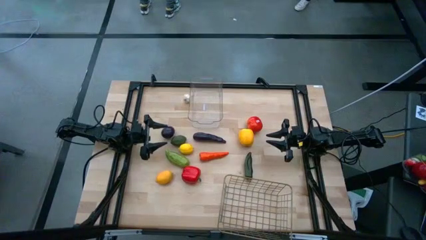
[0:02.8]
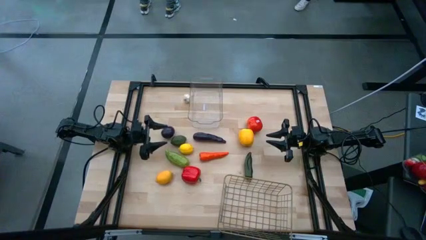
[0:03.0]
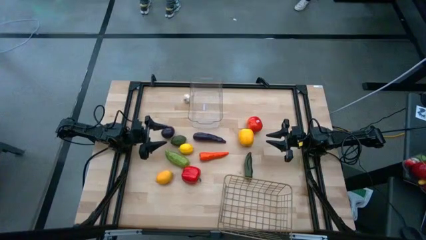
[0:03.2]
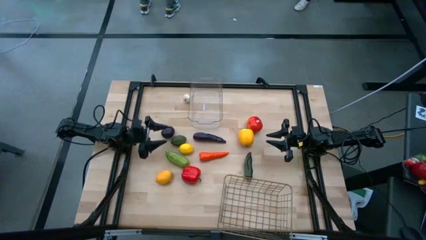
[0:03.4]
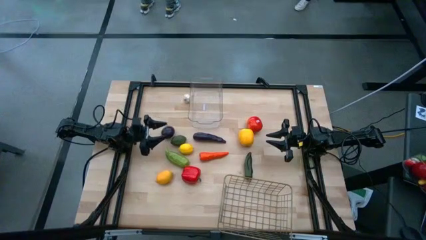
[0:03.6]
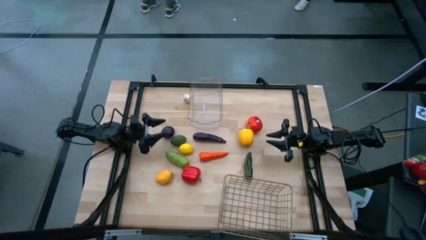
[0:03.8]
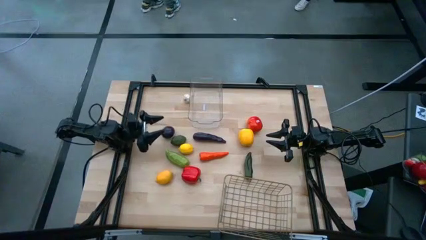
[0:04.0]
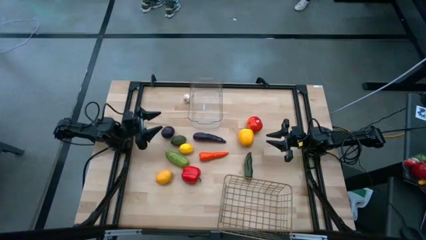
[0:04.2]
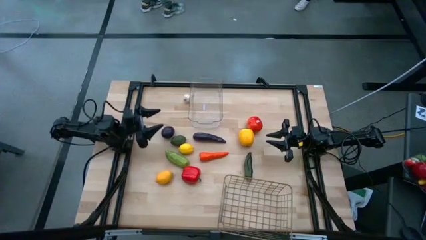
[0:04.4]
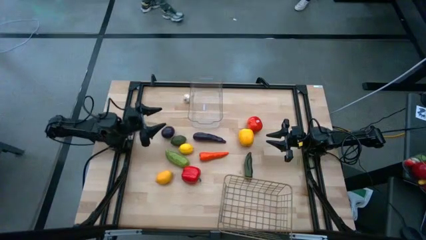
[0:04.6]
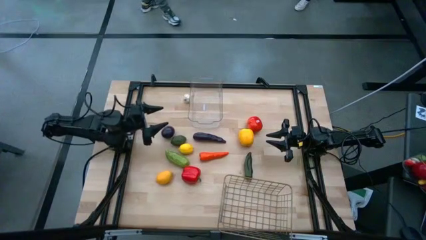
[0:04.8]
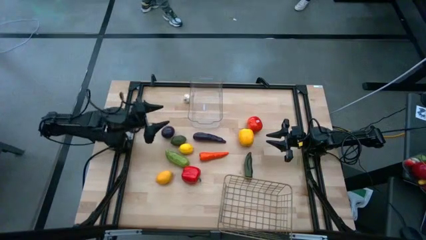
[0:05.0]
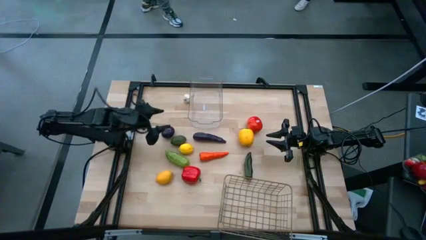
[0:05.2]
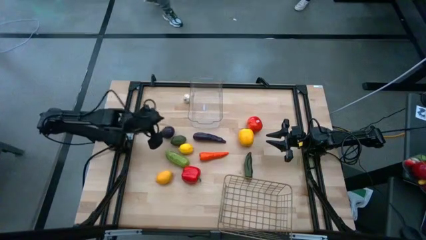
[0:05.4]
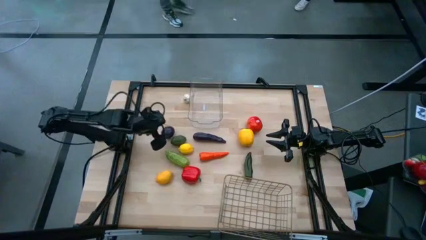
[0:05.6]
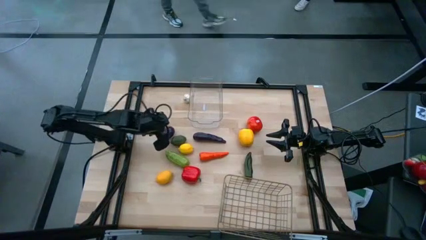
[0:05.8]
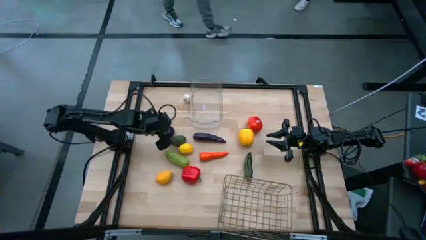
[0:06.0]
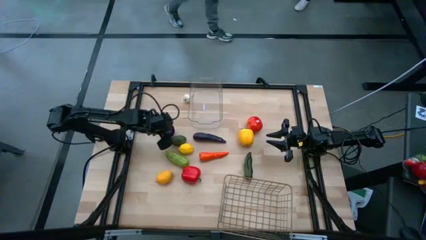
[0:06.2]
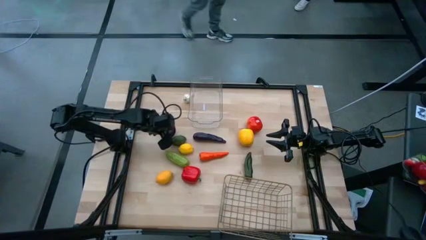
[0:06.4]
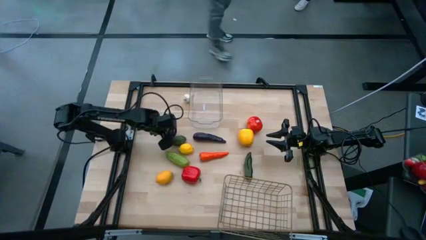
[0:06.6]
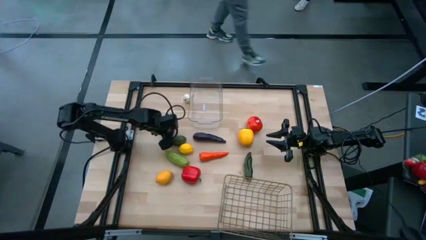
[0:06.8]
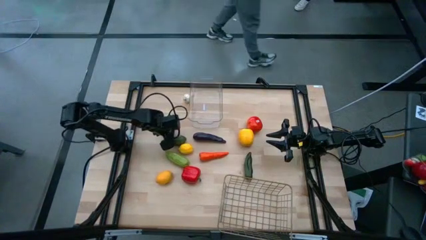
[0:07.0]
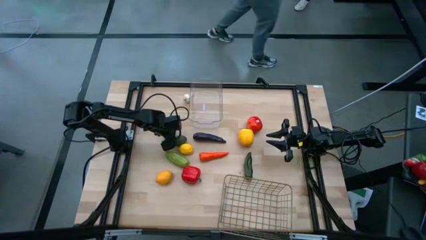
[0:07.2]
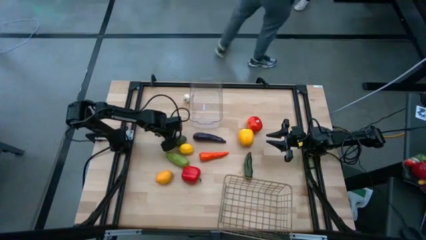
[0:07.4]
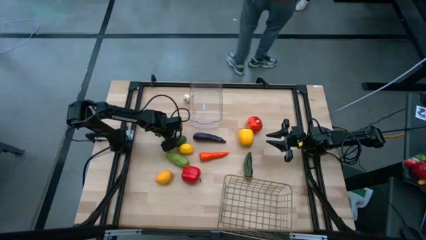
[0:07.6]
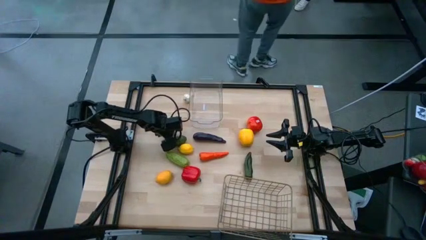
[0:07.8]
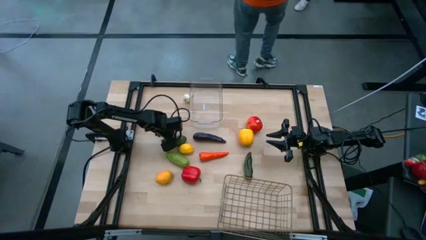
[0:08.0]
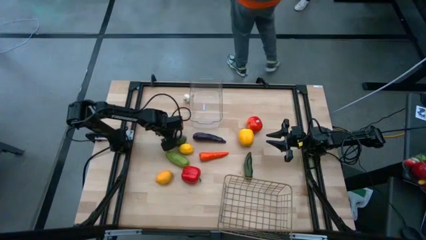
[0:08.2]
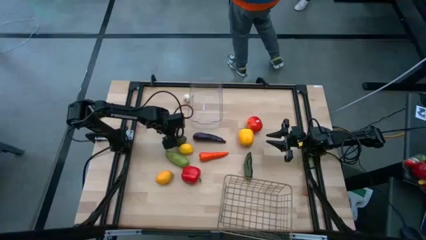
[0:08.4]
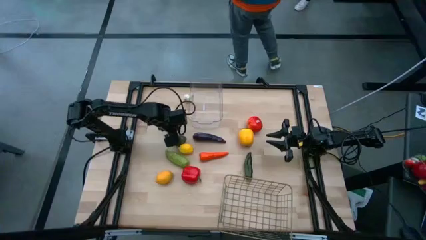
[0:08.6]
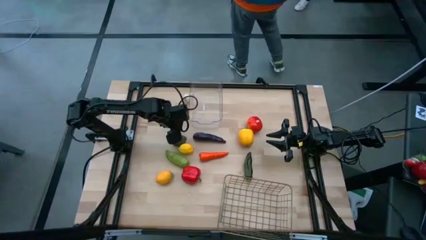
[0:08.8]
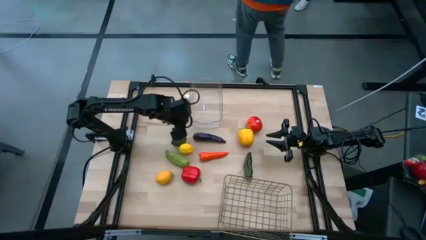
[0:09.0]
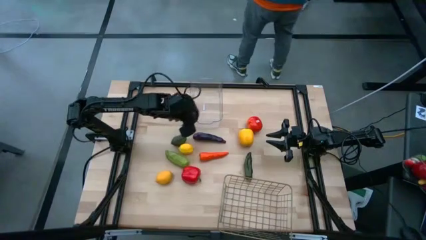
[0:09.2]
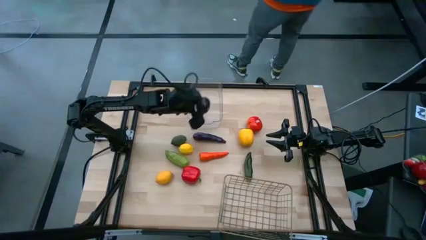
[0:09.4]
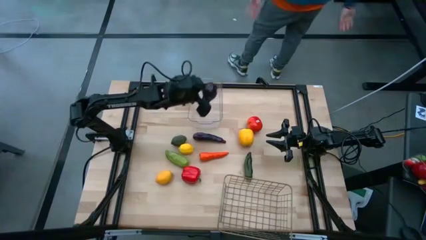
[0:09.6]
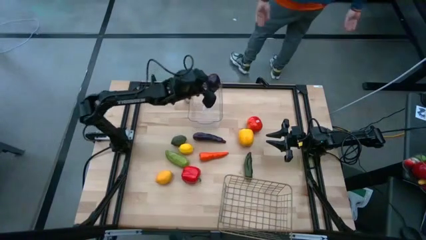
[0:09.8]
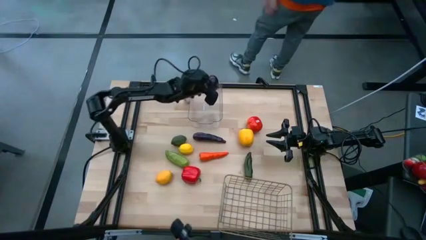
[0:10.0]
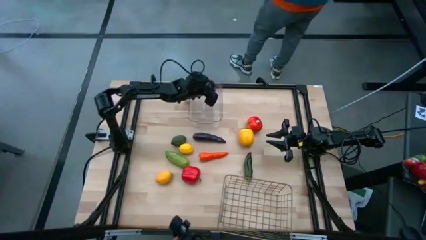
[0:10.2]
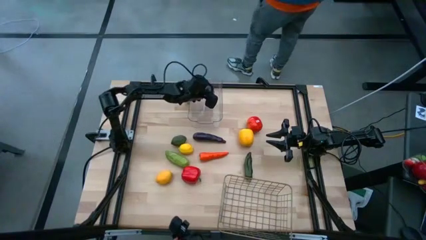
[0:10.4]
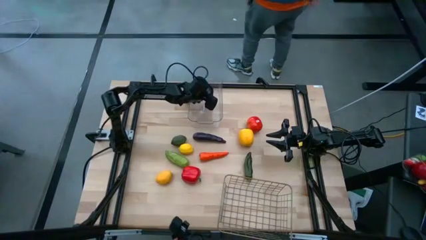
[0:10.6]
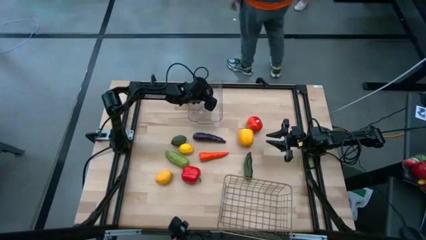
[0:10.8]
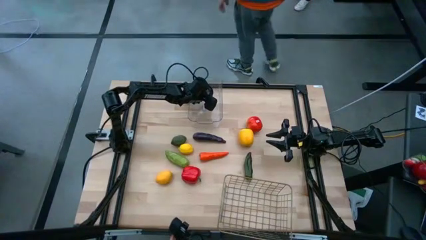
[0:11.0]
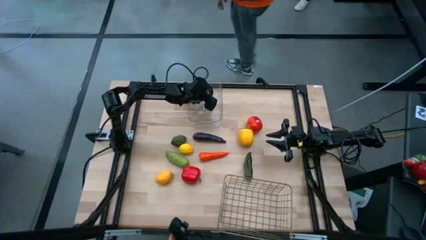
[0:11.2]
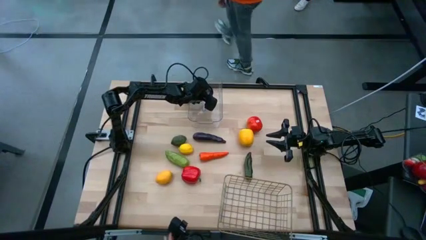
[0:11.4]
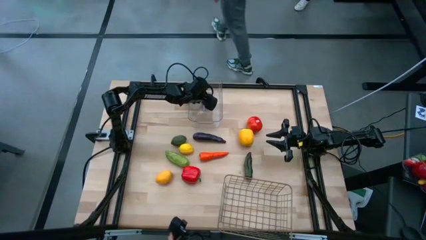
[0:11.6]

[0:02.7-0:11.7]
Task: Sort produce into baskets
Put the purple onion into the transparent bin

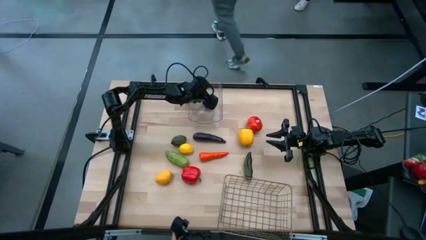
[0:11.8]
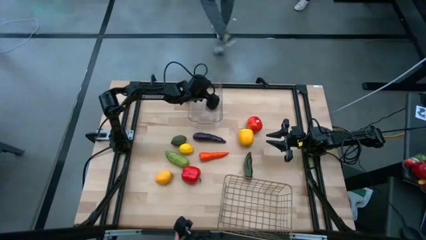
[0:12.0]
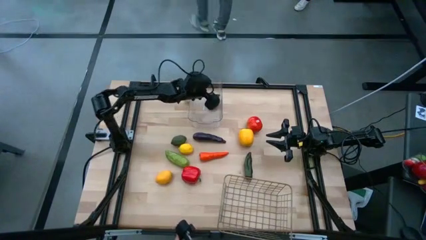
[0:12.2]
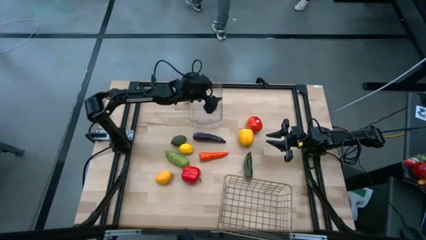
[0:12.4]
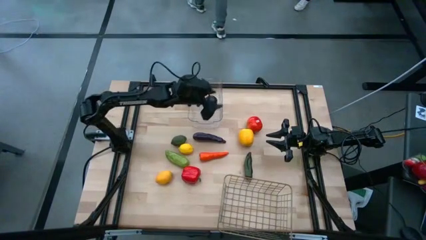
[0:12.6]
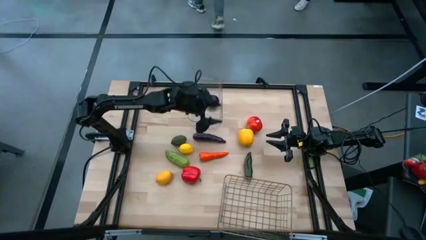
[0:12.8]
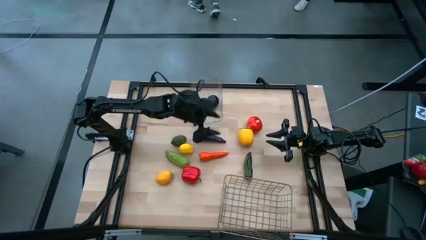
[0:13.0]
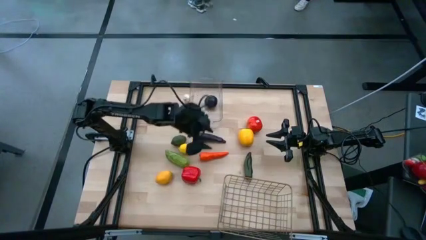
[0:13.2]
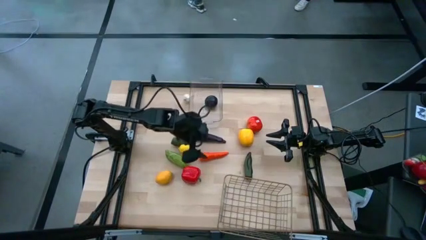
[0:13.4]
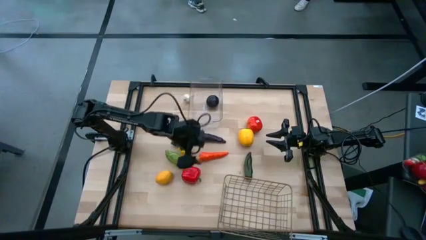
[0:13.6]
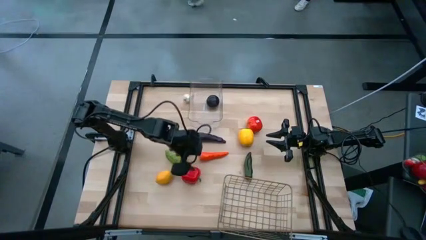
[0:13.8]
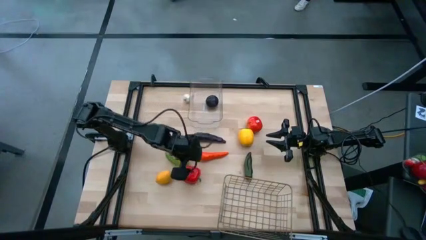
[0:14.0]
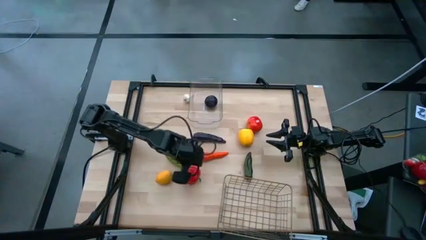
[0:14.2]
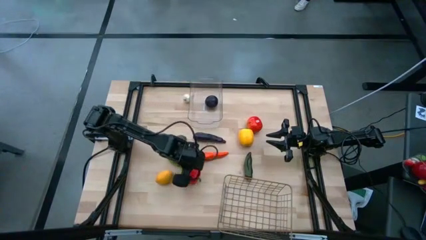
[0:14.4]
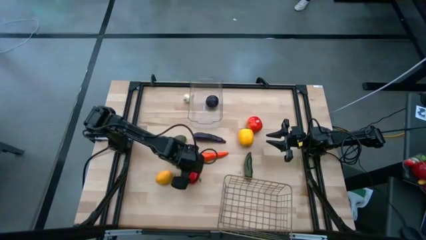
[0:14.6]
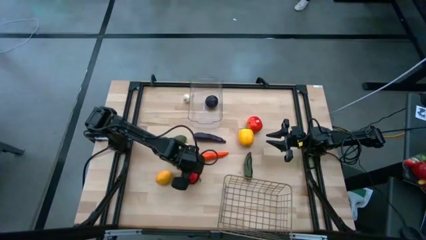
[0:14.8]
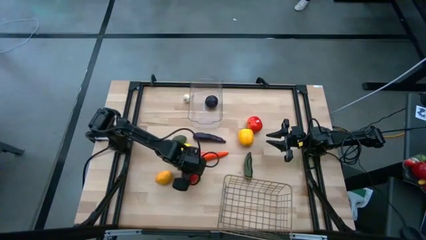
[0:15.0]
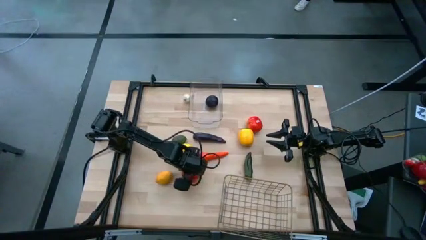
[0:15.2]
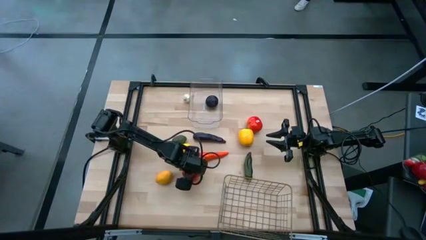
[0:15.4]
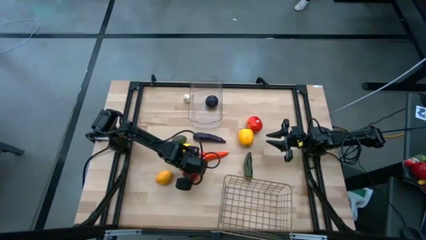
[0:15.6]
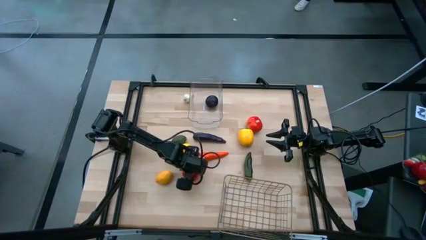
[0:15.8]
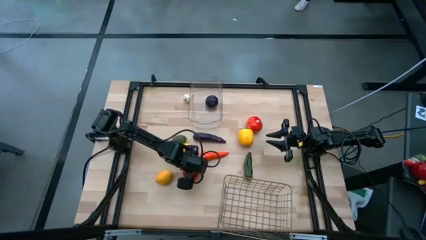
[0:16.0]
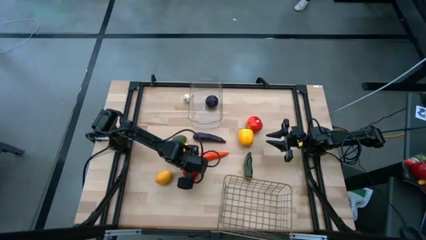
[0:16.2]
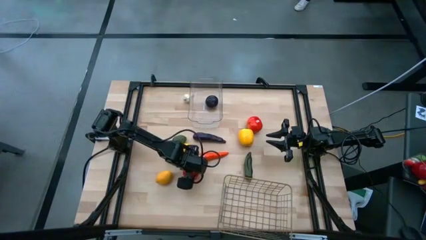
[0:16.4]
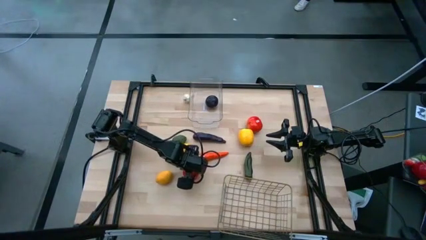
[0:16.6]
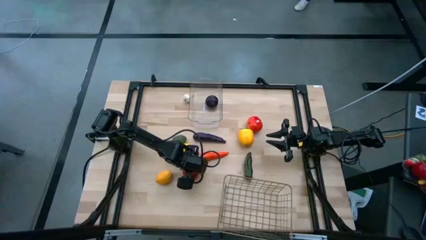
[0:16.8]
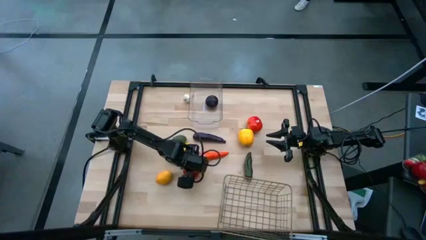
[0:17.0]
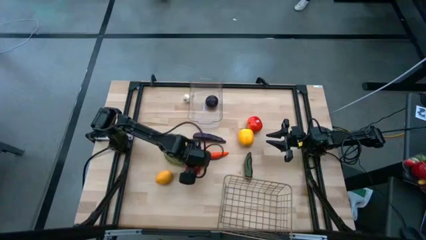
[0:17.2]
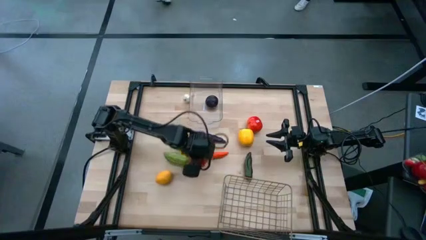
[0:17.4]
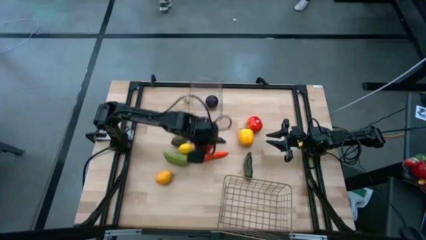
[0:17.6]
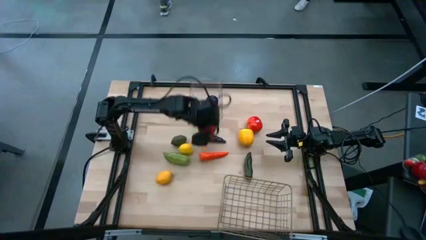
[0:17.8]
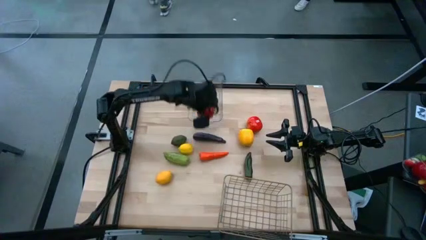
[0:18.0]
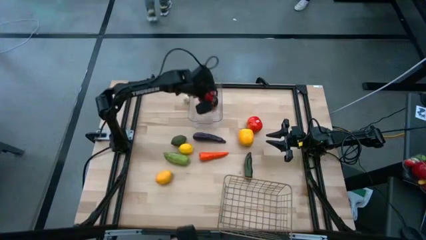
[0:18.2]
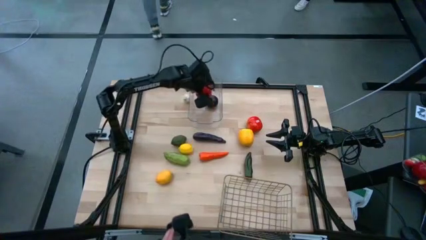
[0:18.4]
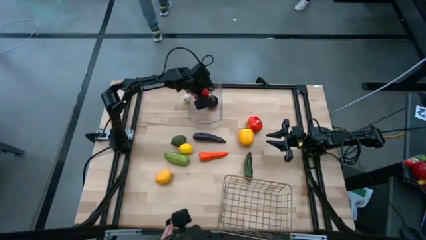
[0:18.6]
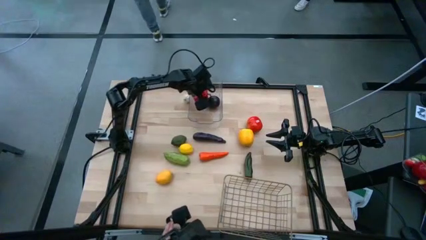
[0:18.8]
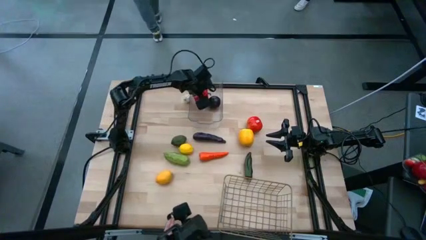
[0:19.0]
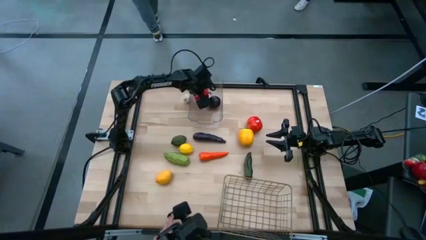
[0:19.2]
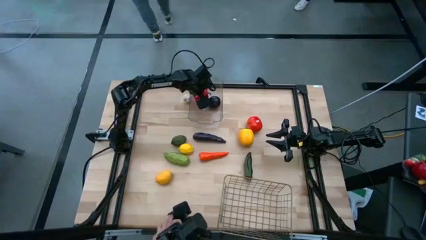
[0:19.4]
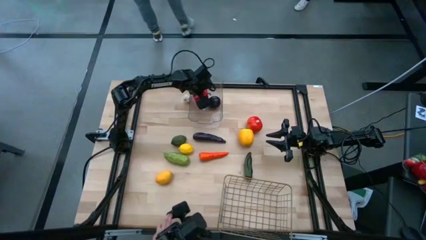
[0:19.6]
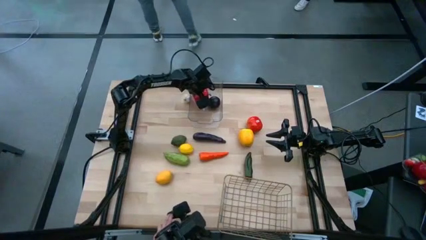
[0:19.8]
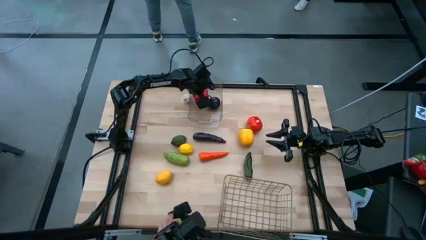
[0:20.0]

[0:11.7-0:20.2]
Put the red bell pepper into the transparent bin
